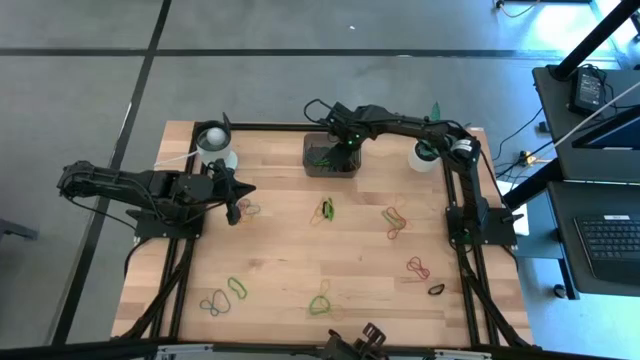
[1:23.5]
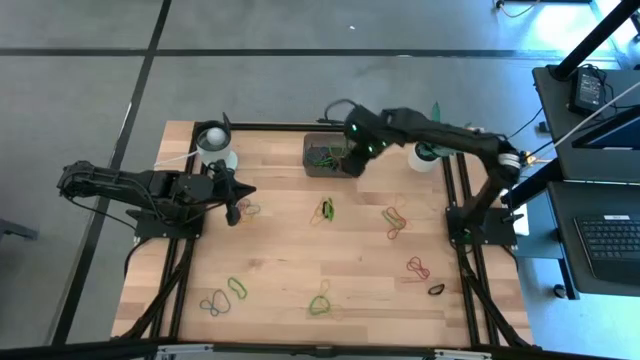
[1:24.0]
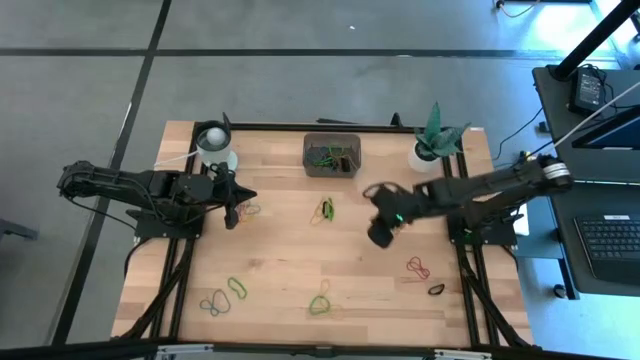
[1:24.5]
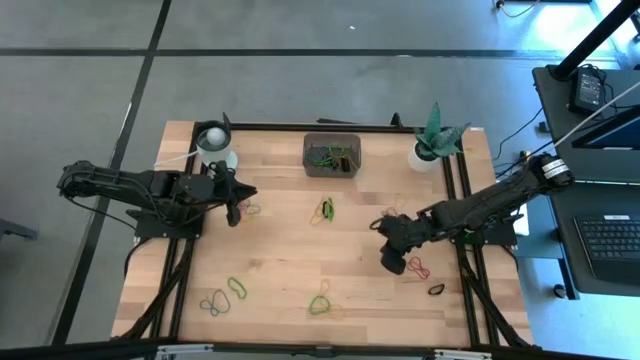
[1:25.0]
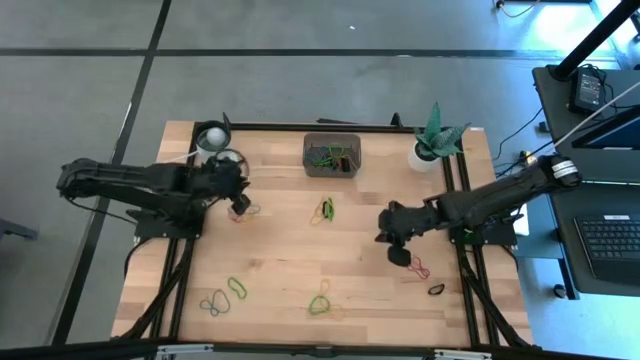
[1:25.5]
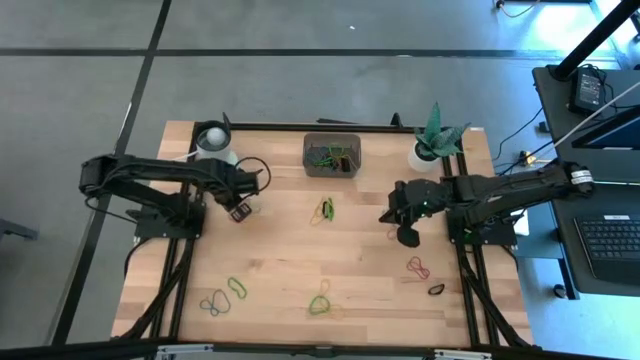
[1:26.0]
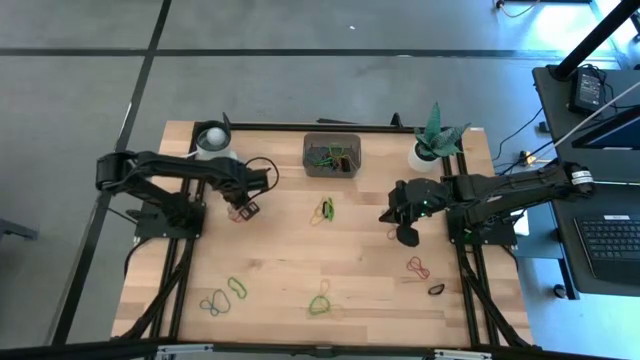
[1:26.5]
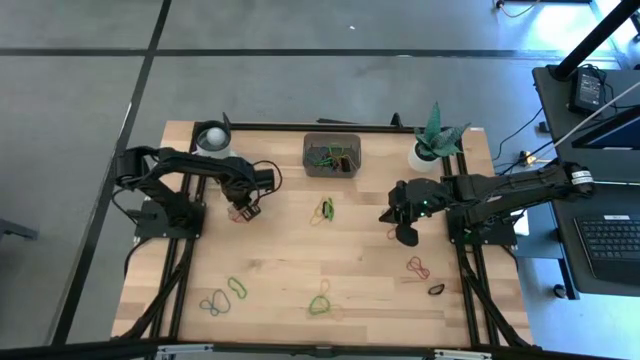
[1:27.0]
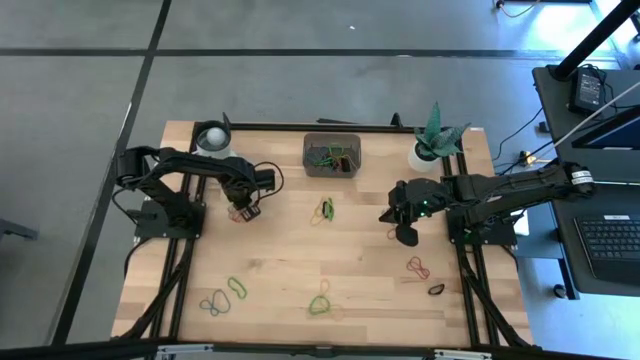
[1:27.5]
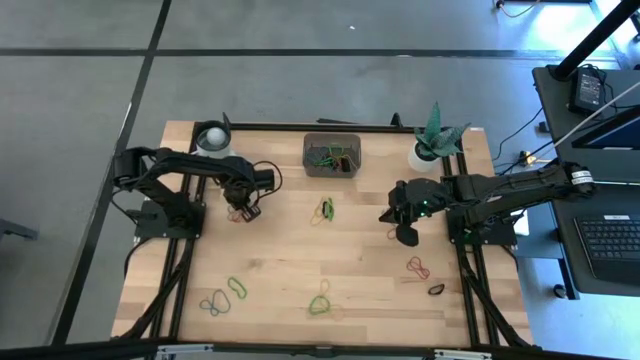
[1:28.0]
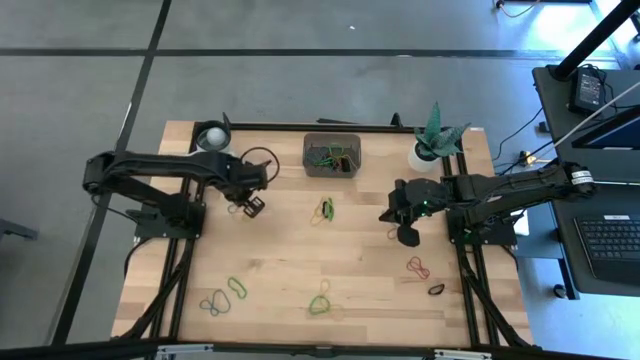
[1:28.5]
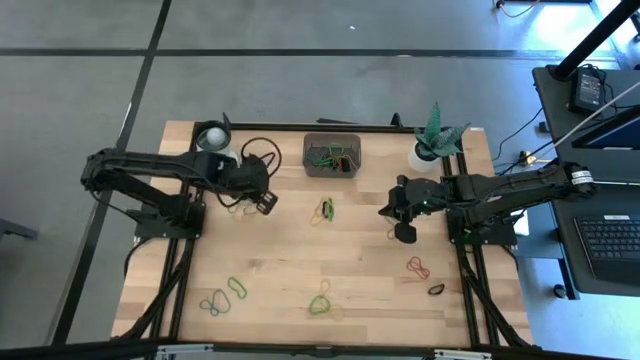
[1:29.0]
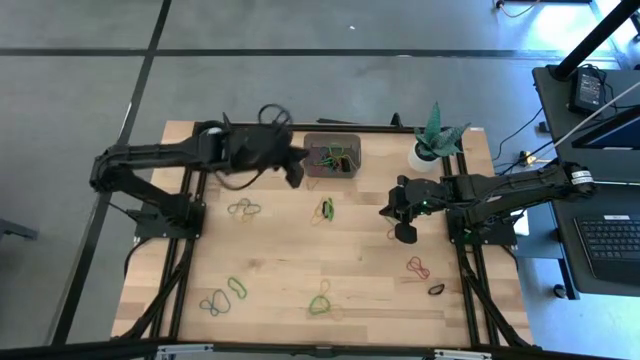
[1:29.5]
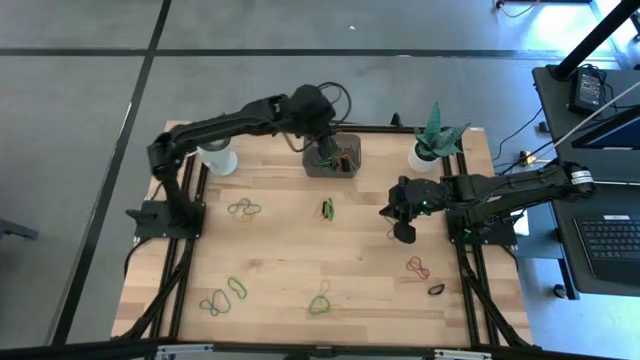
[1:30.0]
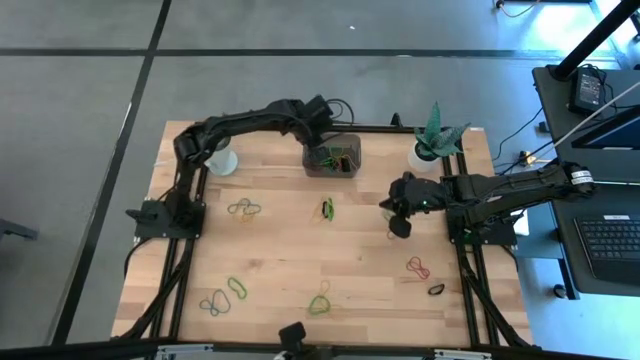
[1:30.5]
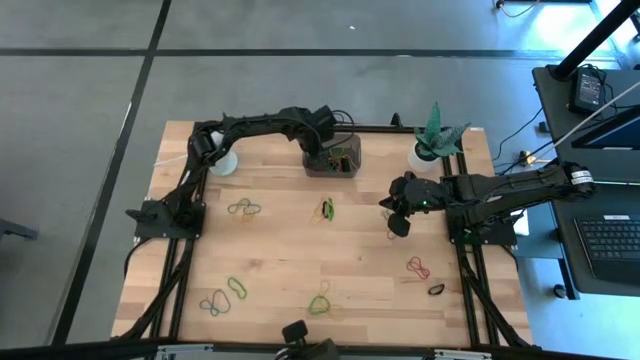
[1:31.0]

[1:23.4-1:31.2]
Task: Pick and place rubber bands into bin
Put the red rubber band into the bin

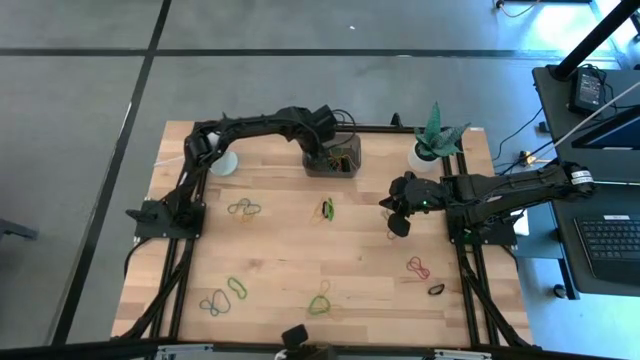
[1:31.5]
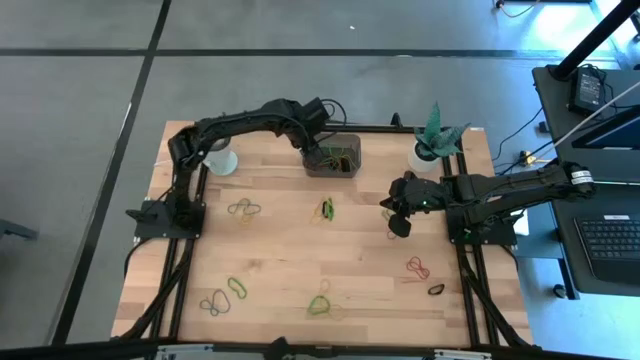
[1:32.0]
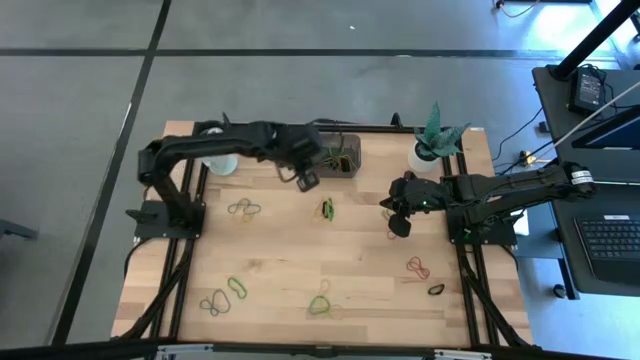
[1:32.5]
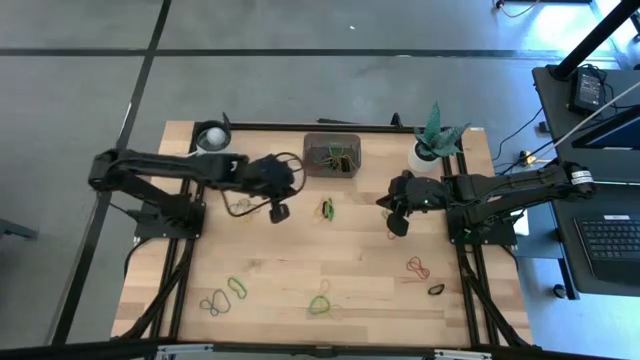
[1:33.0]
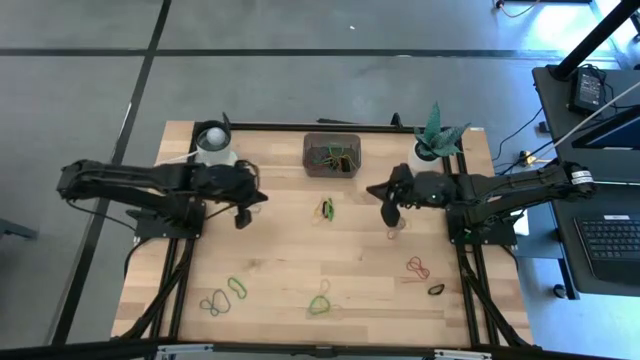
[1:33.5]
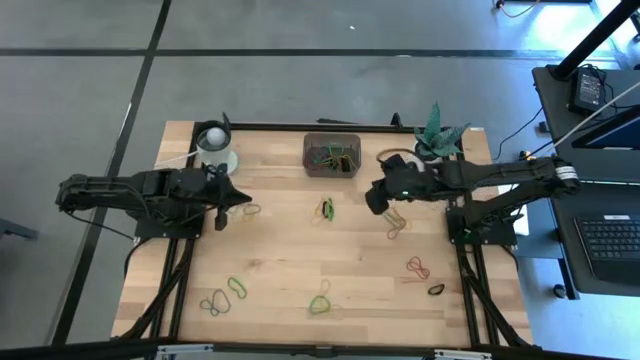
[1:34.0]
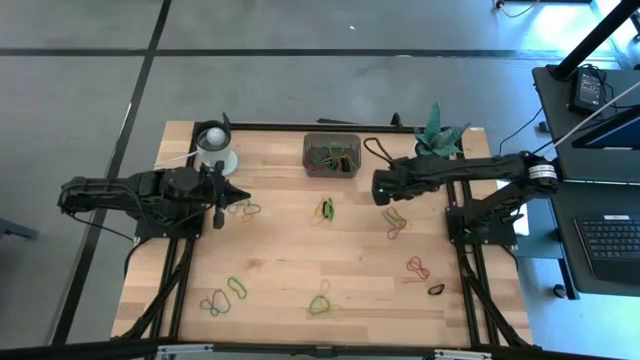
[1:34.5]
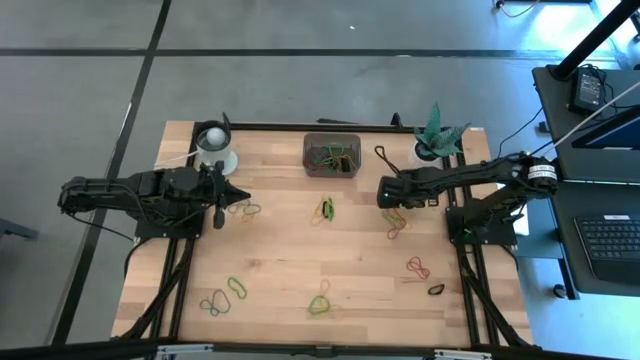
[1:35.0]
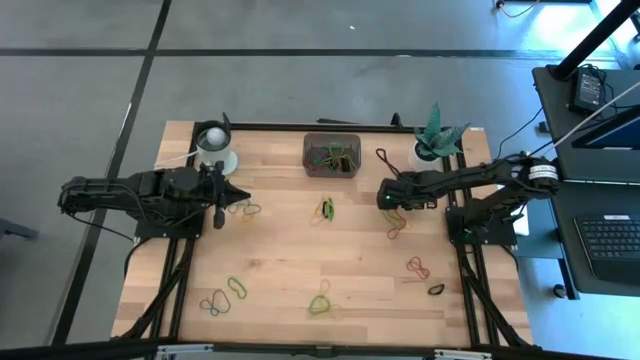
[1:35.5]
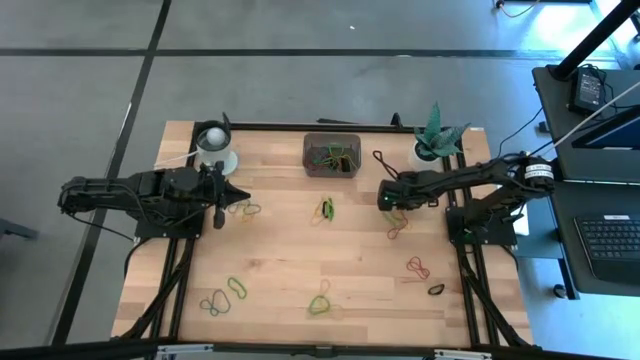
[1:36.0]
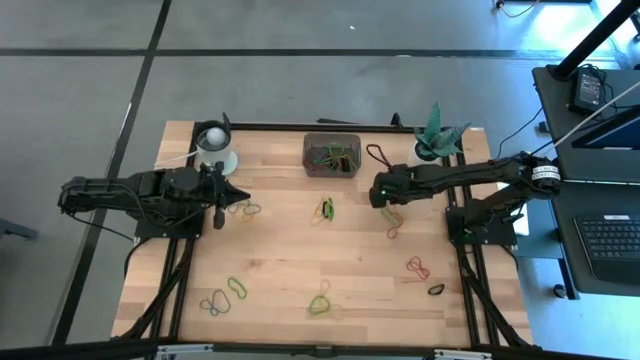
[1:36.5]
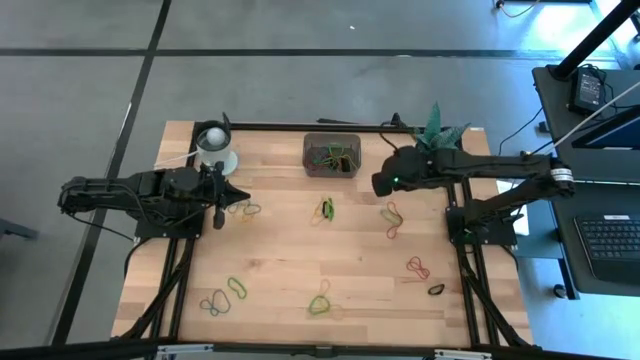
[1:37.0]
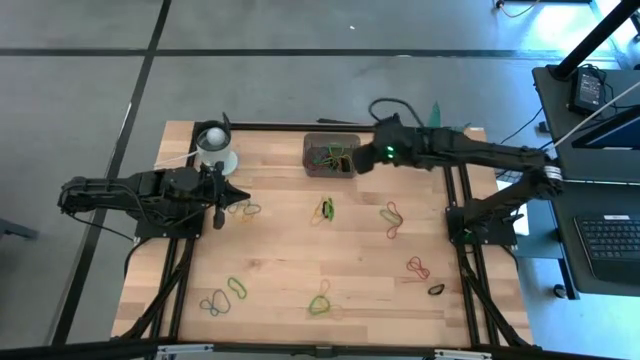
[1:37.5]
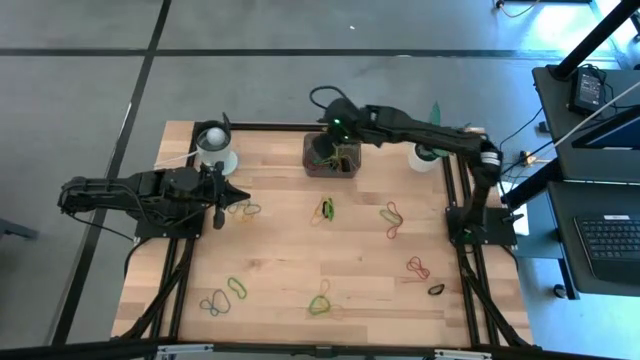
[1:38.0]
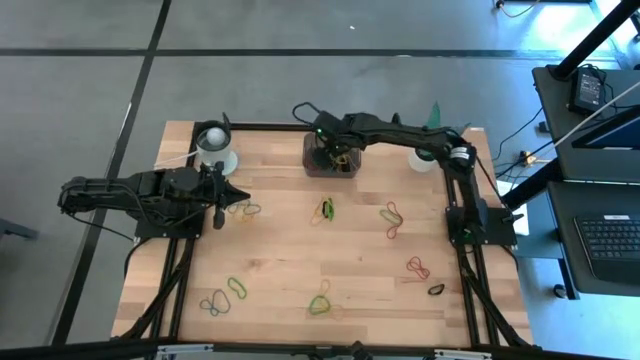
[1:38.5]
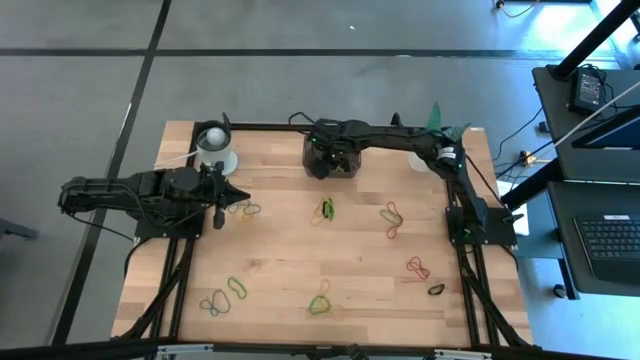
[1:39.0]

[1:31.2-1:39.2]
Put the yellow rubber band into the bin

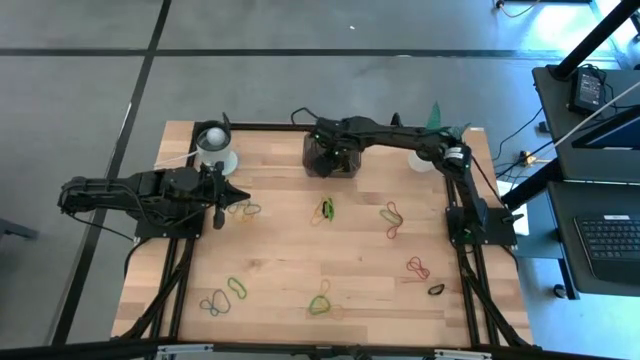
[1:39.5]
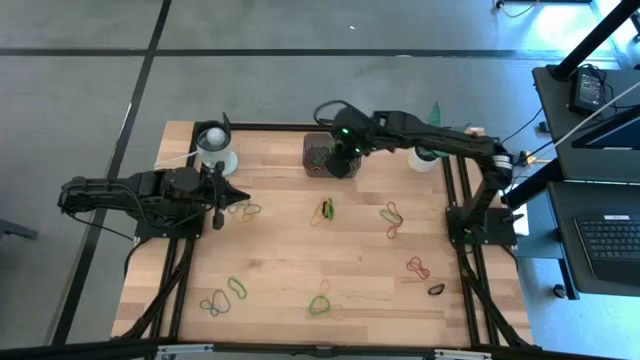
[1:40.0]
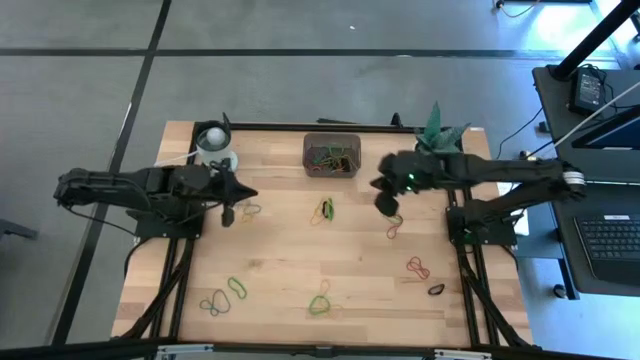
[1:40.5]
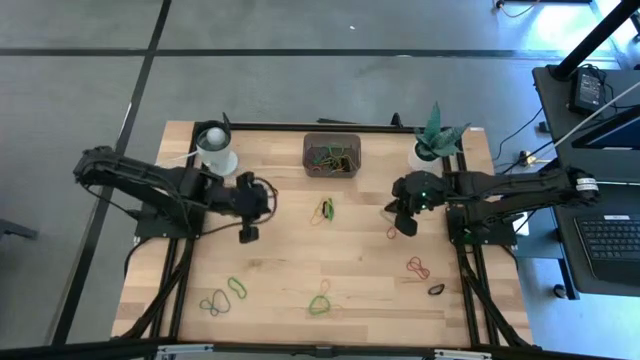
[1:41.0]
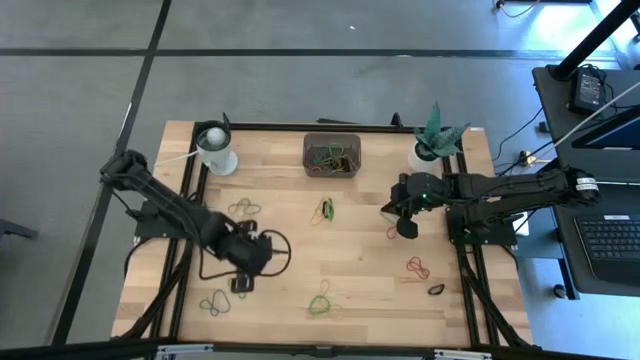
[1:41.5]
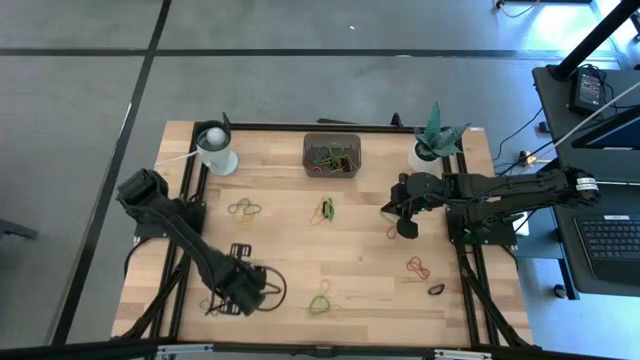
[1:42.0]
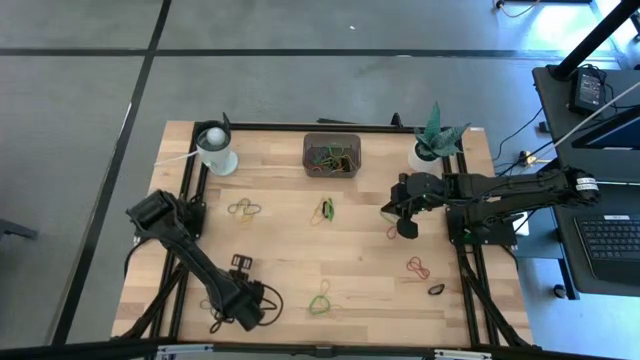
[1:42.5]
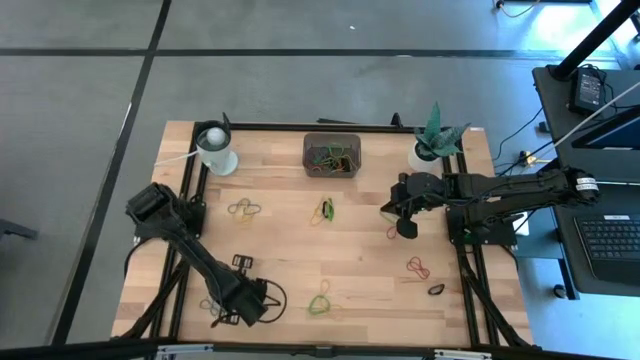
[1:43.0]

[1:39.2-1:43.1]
Put the green rubber band into the bin

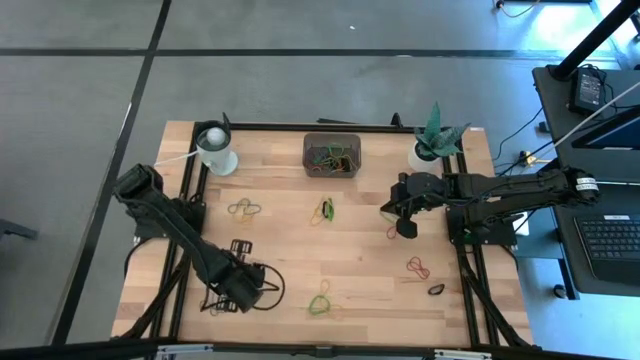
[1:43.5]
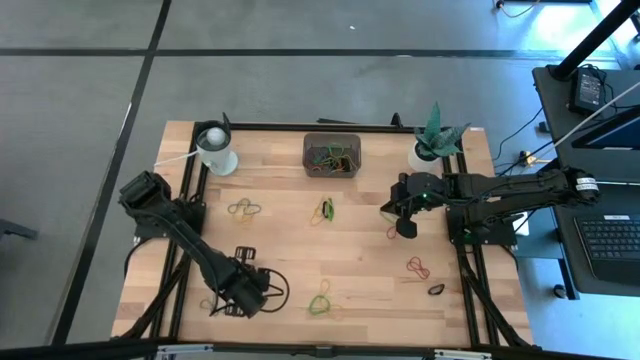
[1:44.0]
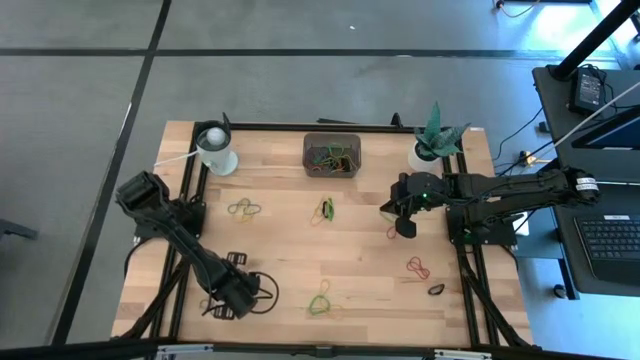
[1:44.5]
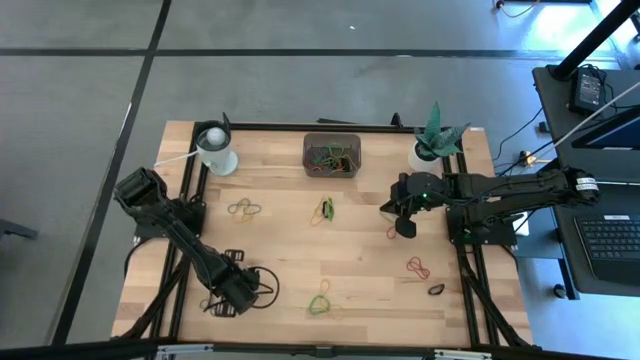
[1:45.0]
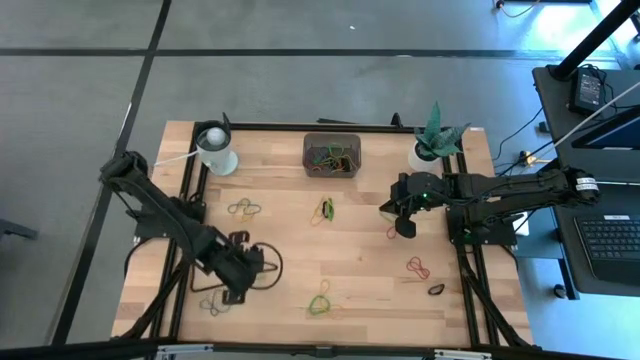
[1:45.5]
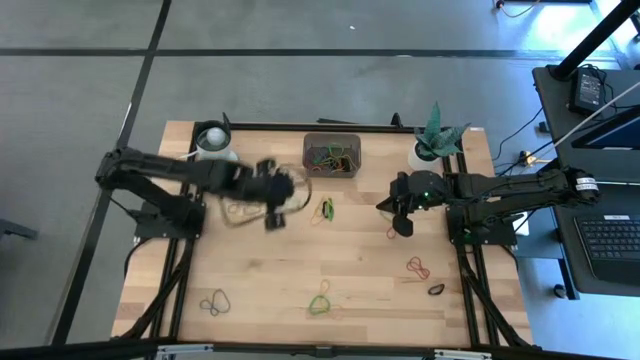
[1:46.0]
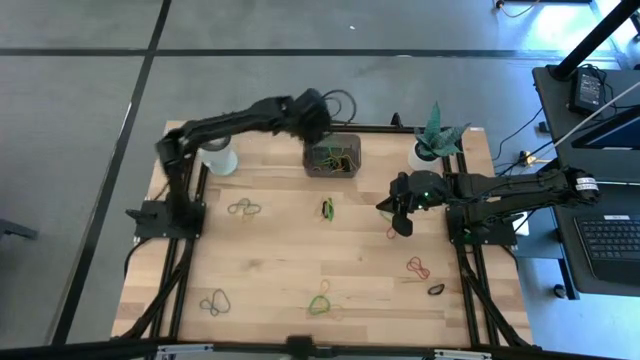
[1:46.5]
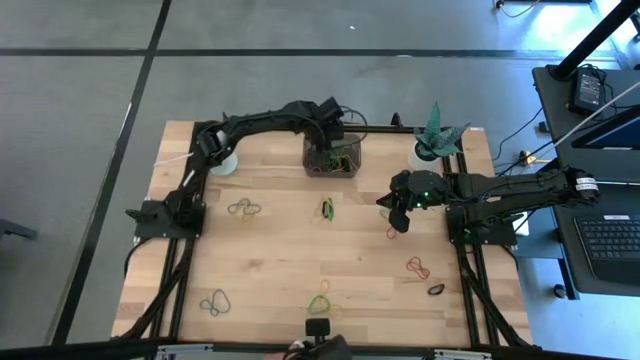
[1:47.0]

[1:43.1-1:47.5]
Put the green rubber band into the bin
